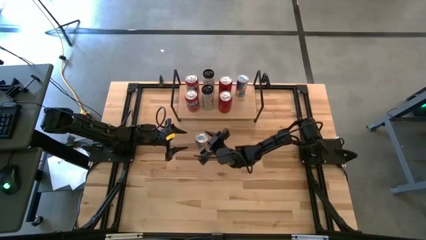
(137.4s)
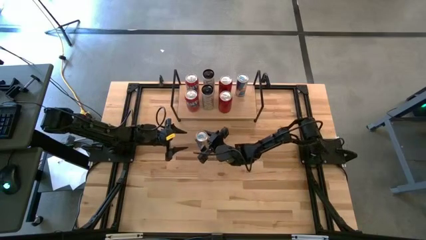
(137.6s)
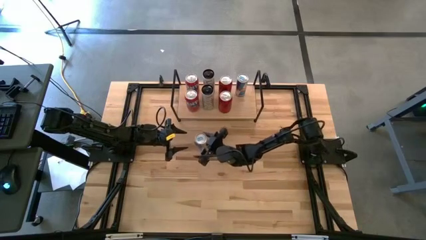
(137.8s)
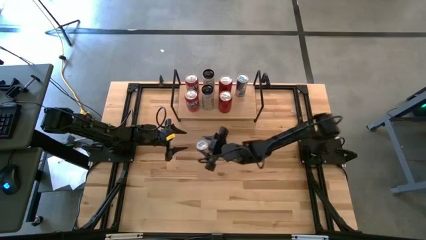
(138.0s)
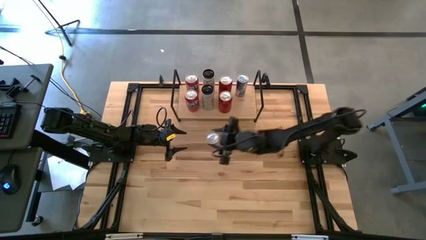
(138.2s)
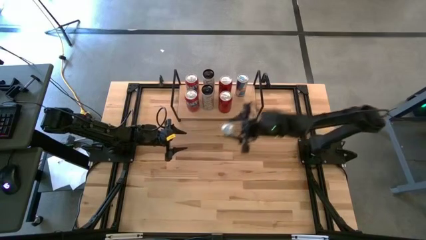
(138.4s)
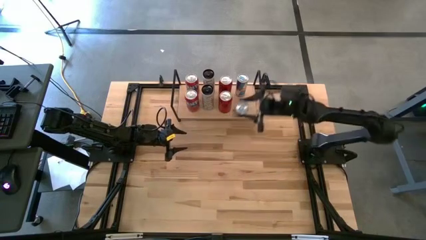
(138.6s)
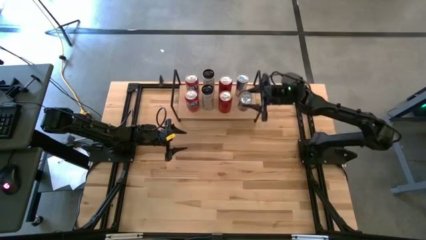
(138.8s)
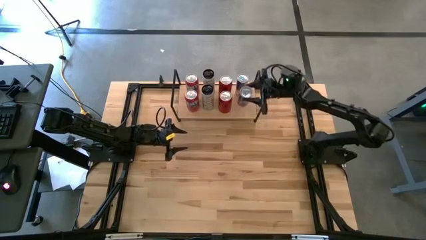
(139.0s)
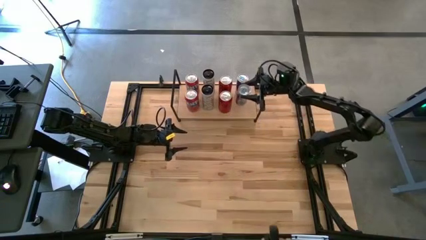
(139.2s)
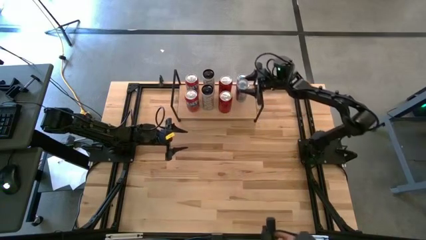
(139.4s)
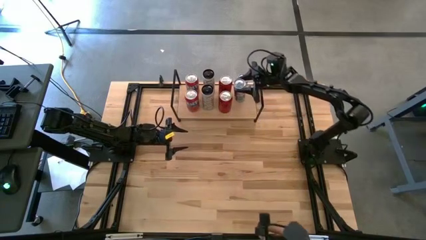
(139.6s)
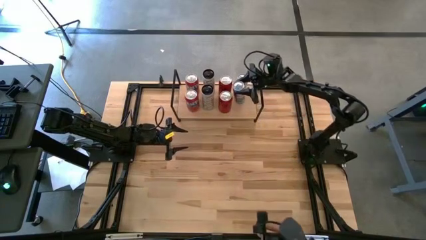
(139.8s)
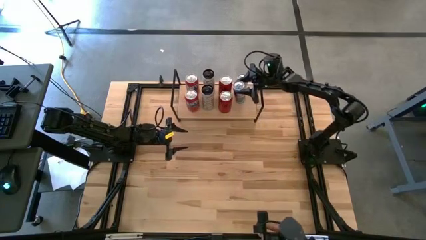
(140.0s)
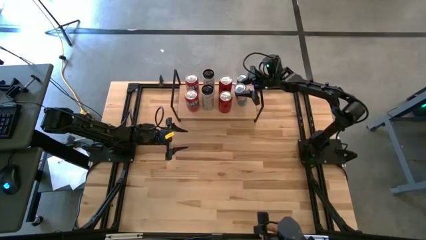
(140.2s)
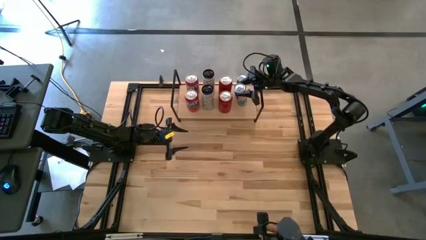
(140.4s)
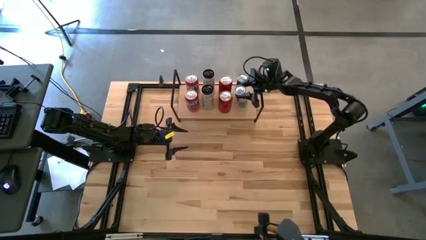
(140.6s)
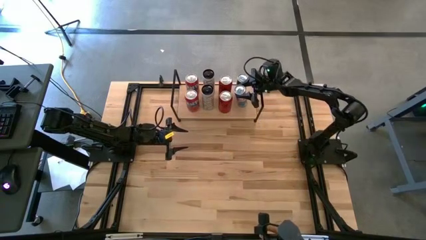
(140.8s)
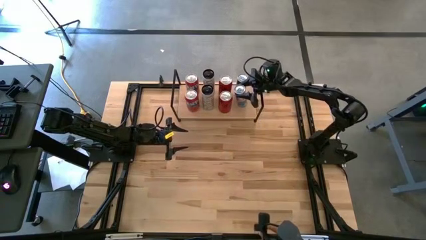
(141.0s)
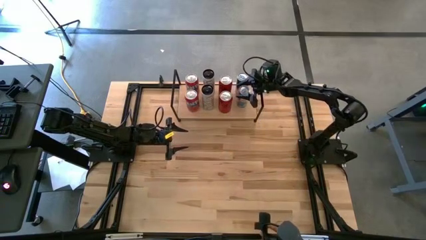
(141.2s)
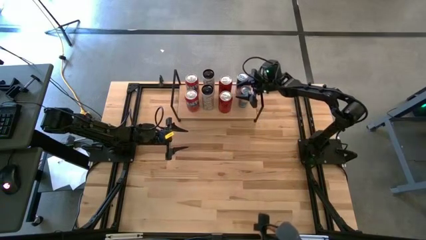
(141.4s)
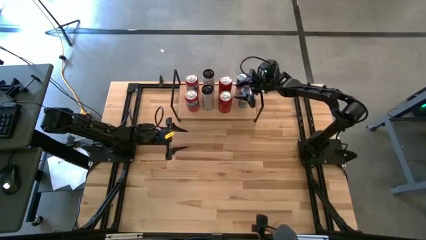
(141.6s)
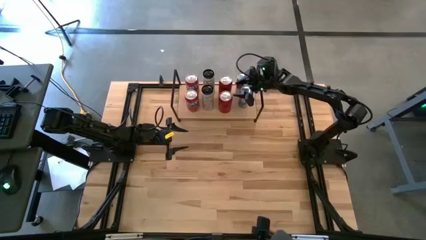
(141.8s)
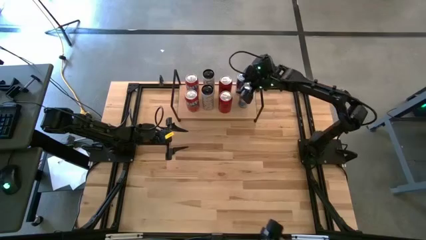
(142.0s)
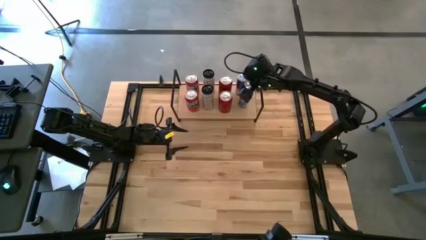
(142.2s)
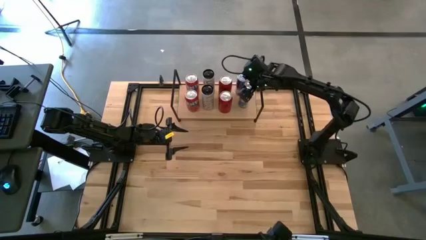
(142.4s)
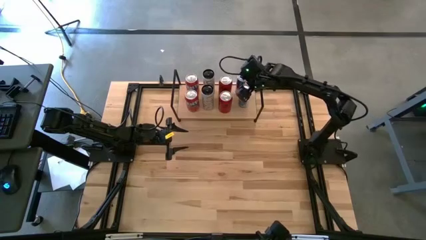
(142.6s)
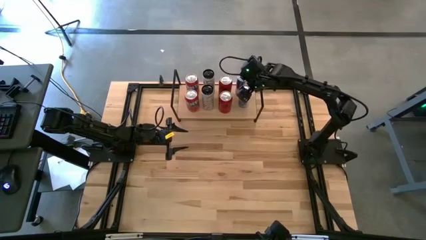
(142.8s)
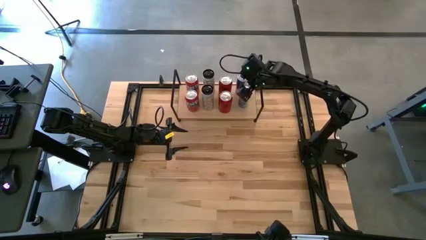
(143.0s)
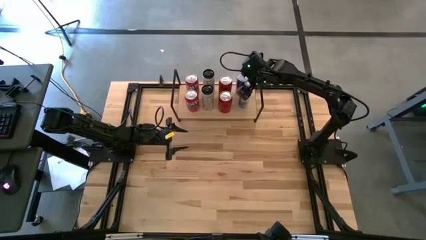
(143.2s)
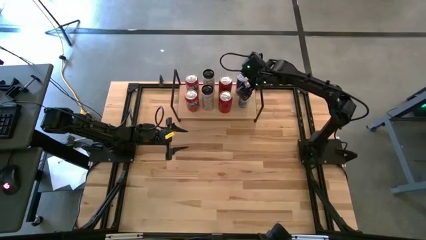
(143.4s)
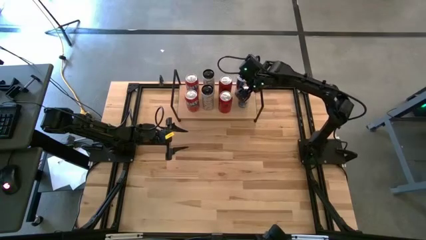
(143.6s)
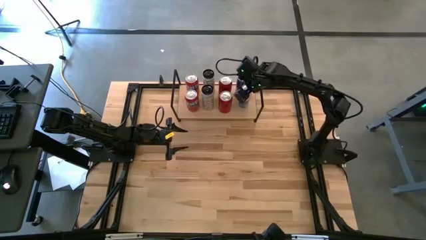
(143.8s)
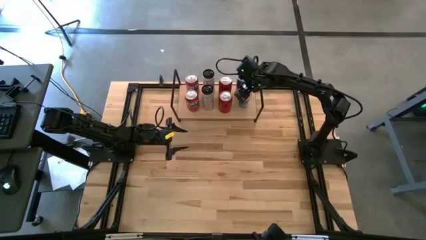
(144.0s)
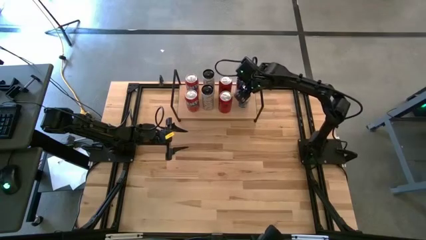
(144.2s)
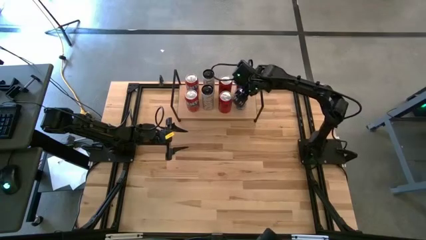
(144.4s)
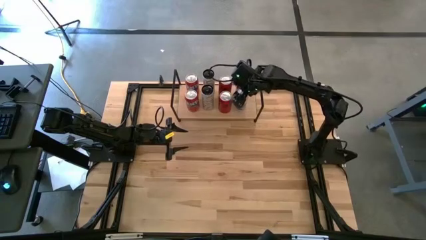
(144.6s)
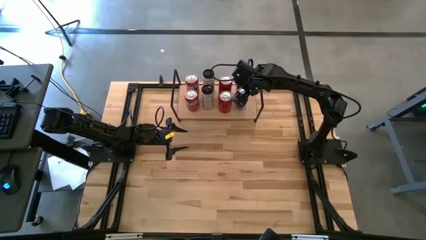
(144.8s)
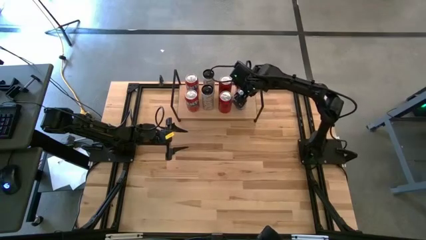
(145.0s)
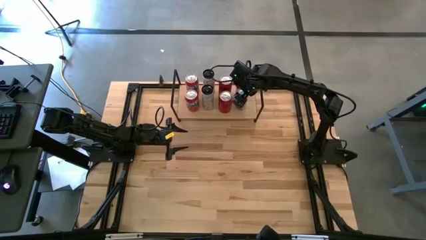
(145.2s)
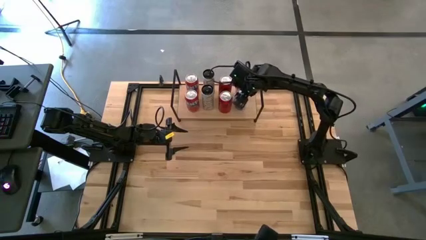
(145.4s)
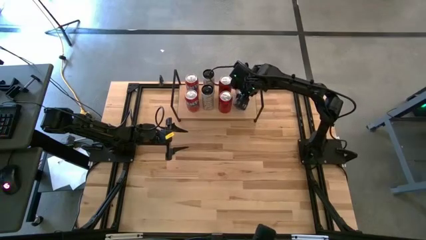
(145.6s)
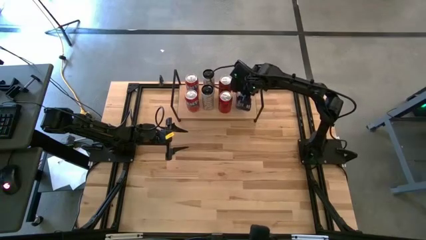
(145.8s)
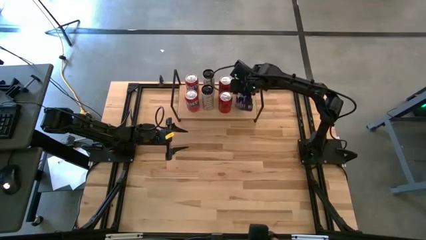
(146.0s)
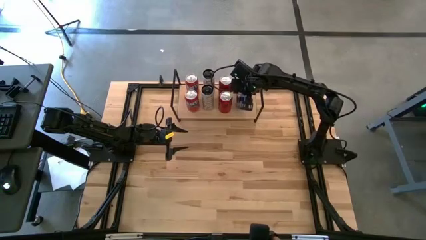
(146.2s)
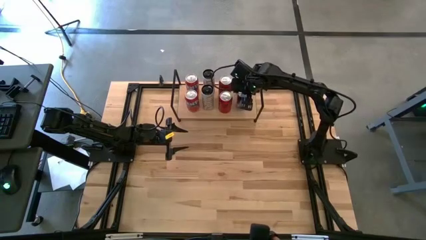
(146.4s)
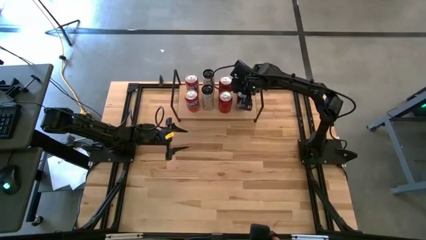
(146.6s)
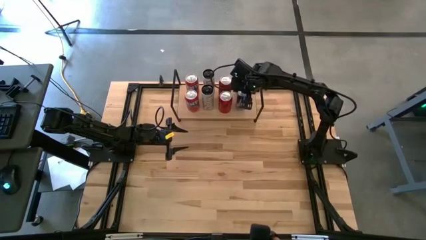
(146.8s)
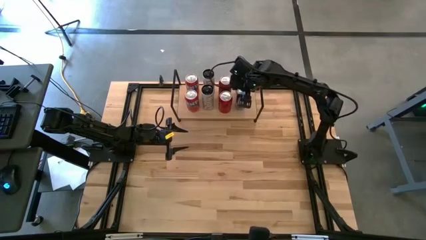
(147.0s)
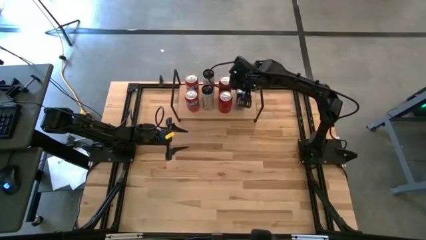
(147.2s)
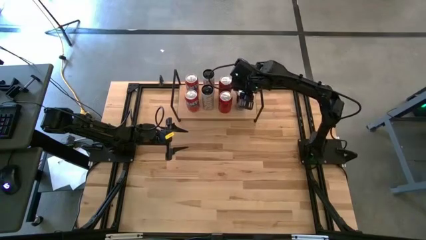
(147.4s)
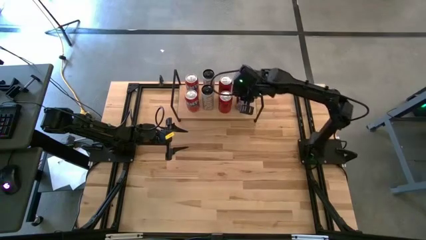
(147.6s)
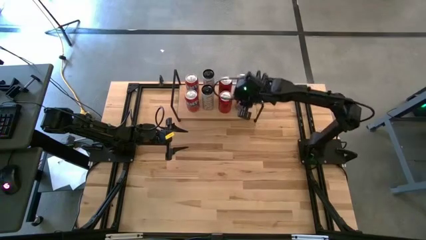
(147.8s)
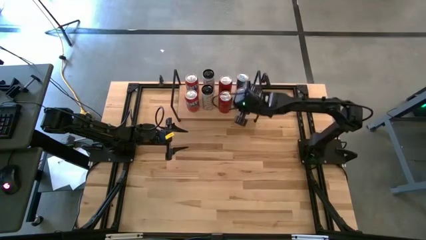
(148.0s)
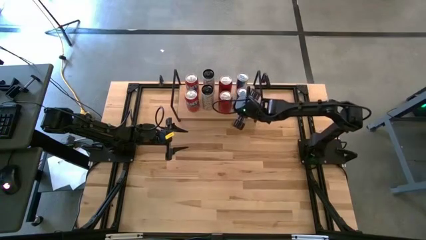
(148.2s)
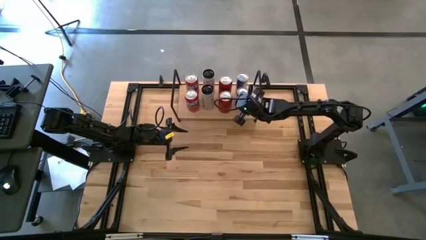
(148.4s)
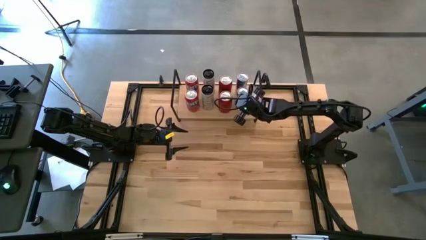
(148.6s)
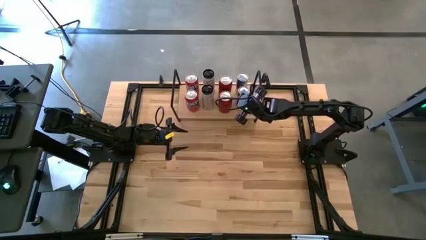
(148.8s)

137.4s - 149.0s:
Task: Place canned beverage on shelf
Put the blue soda can on the shelf aligned with the blue soda can

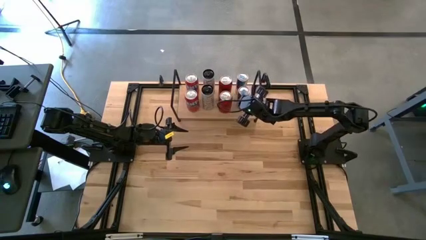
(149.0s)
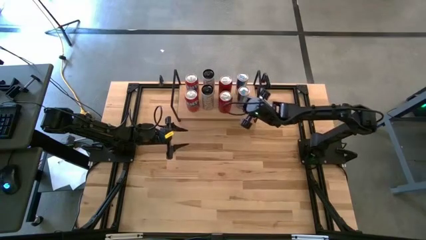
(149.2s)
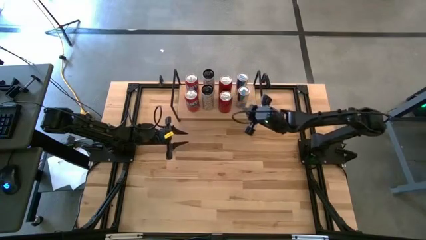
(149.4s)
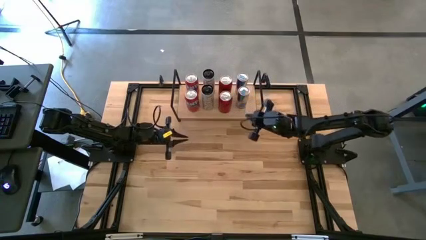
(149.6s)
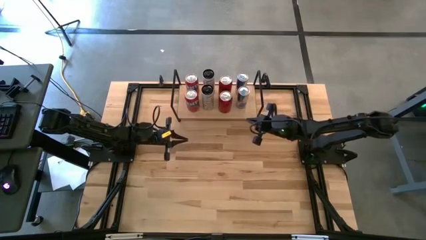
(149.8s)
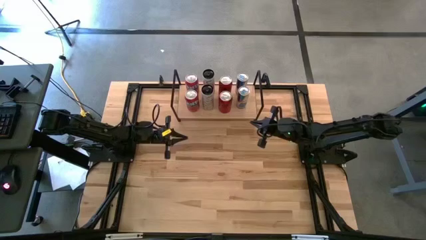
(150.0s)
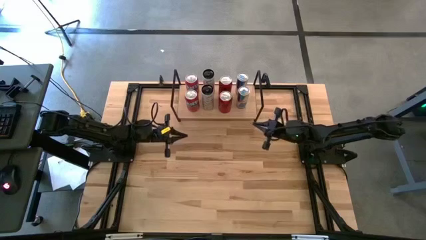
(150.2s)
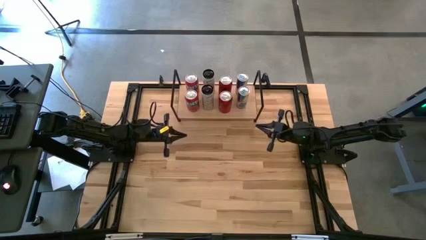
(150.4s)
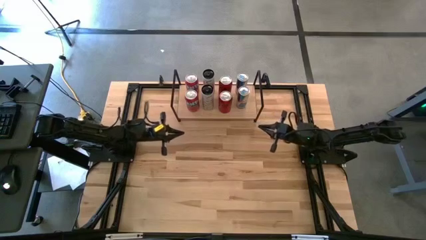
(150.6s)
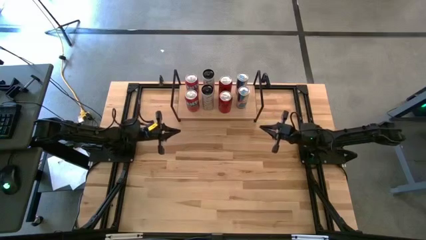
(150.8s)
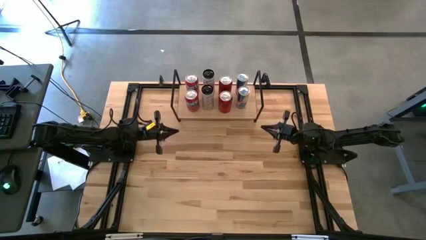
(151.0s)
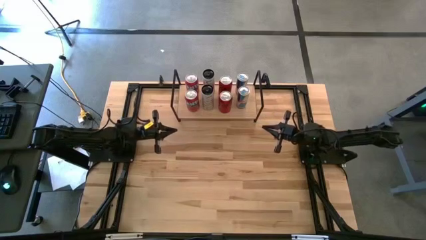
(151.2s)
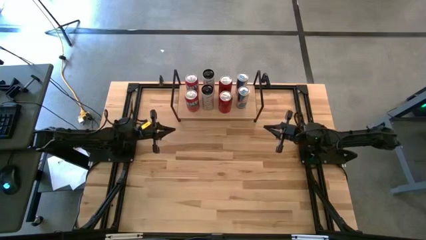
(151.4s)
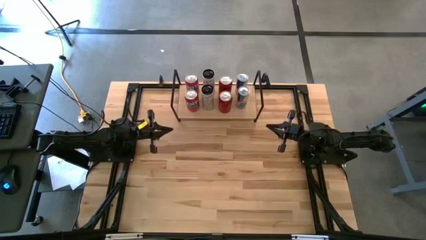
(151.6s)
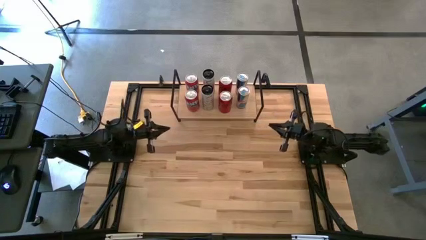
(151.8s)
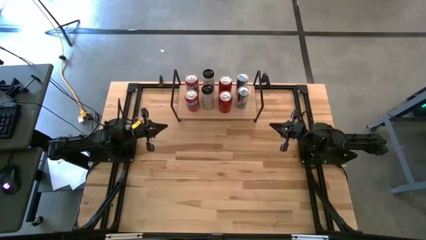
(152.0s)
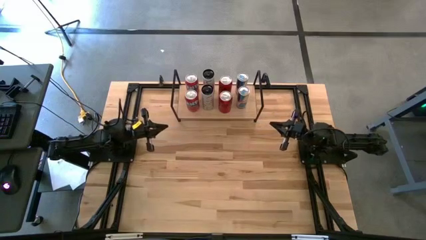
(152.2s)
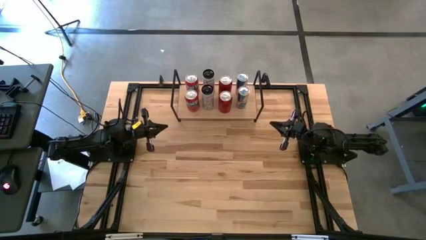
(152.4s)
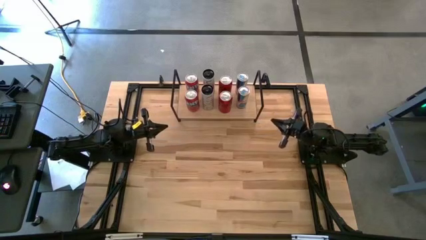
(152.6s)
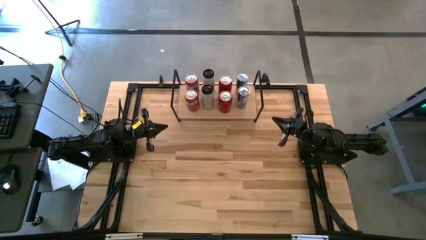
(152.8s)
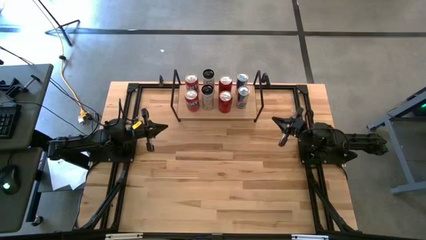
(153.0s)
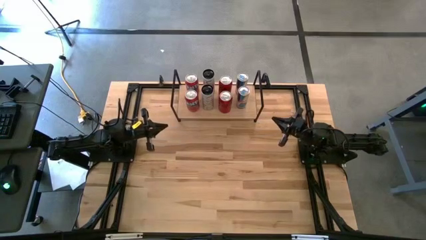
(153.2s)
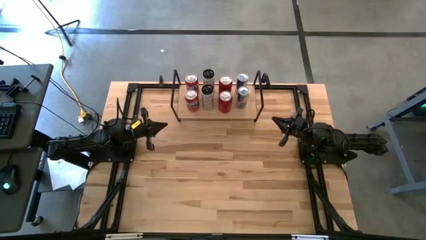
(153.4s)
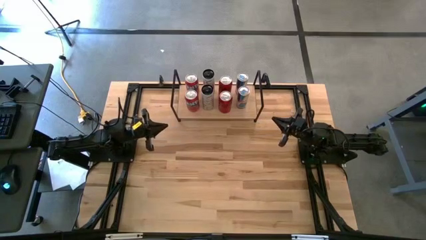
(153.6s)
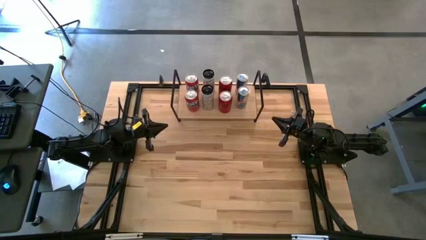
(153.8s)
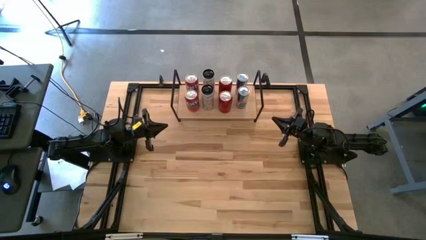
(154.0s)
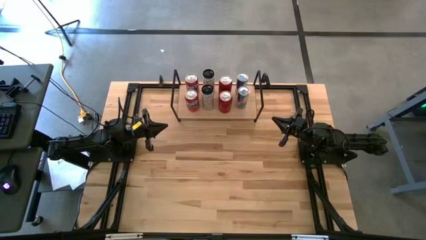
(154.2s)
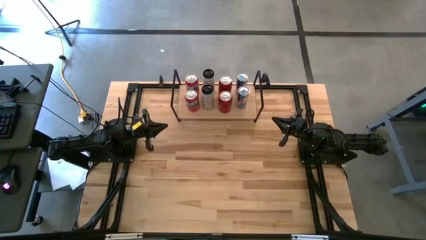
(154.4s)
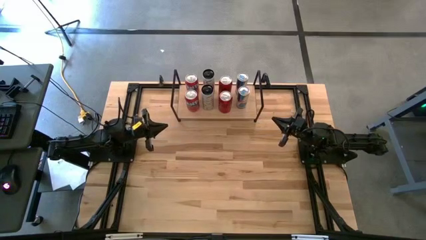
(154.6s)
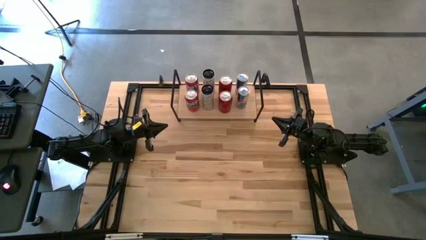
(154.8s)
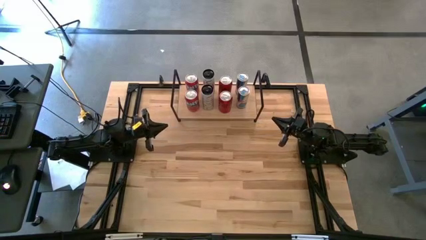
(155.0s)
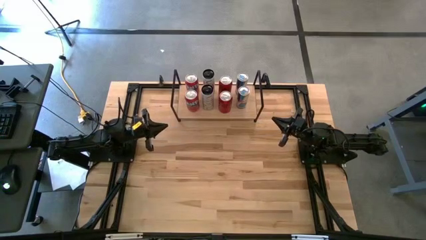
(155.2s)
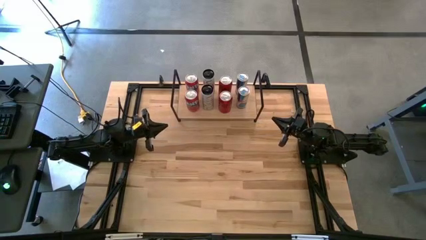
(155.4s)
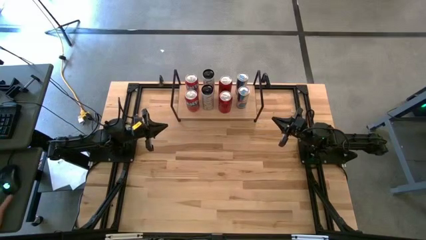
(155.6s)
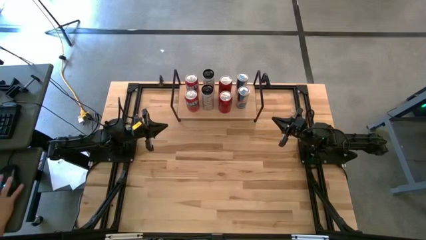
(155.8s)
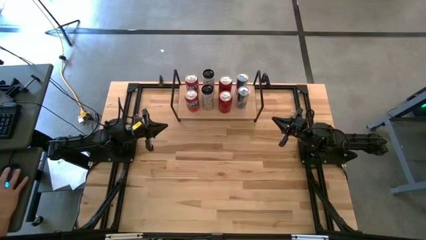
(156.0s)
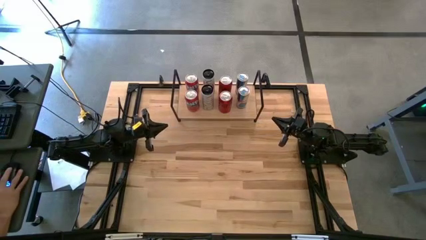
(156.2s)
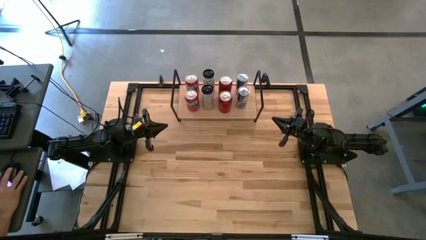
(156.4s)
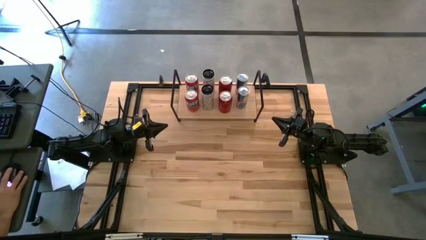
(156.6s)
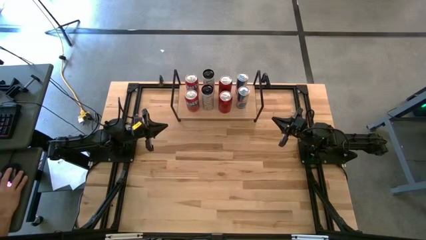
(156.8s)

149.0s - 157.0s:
Return to Home Position
